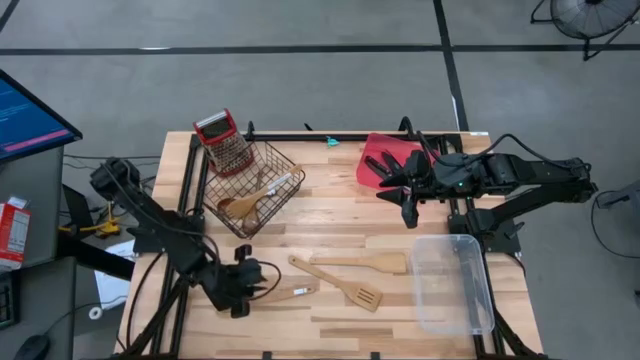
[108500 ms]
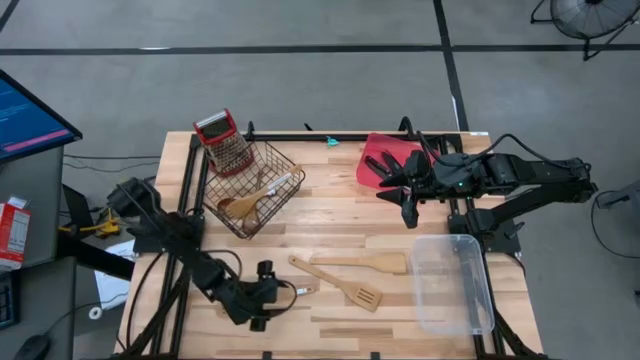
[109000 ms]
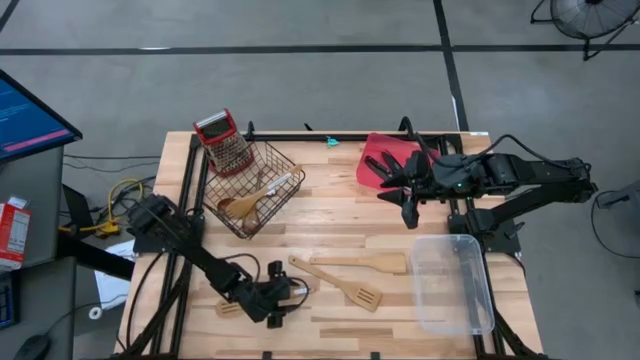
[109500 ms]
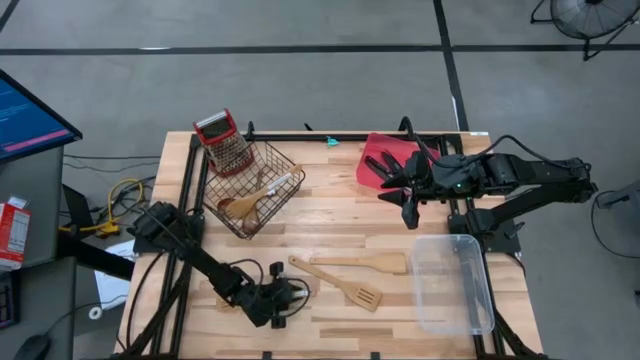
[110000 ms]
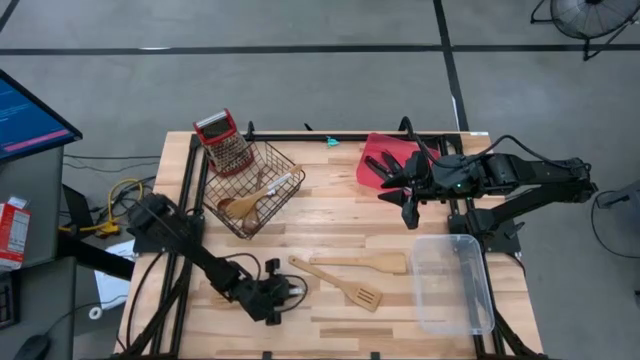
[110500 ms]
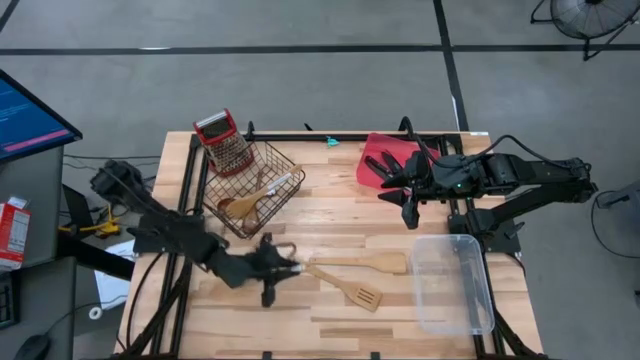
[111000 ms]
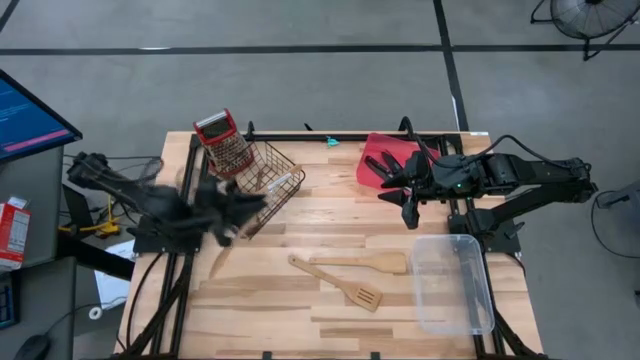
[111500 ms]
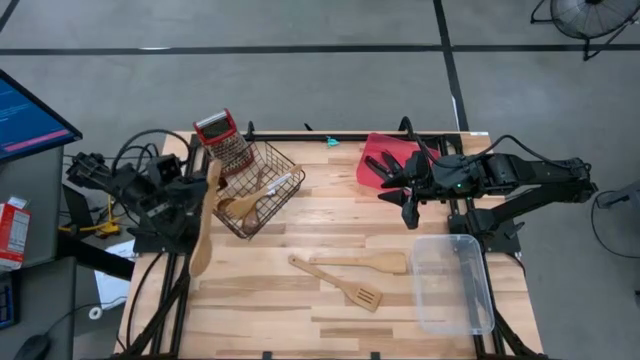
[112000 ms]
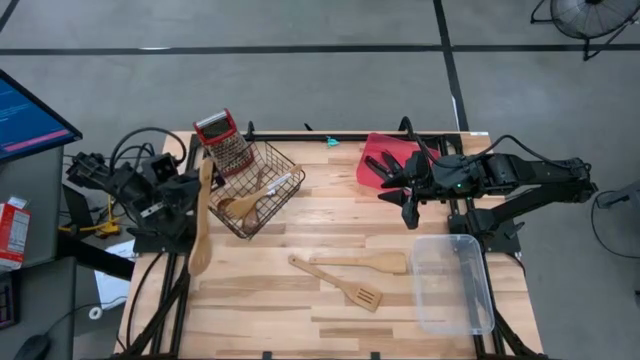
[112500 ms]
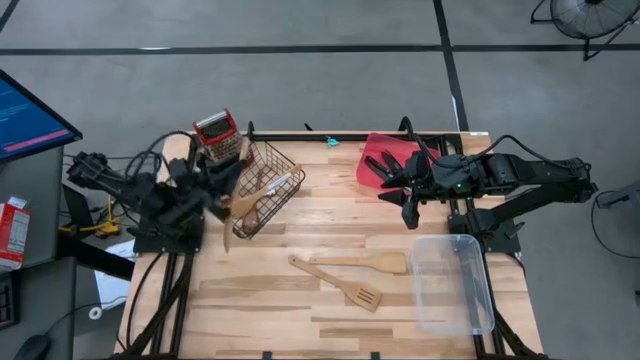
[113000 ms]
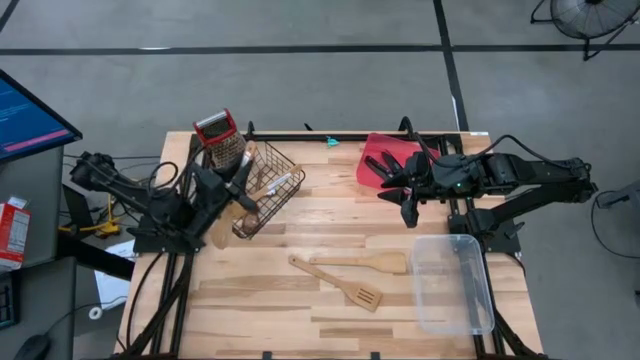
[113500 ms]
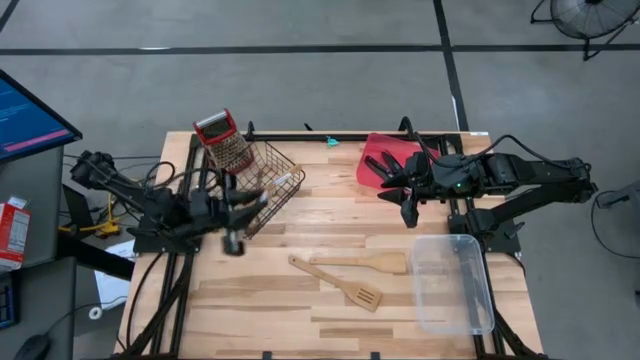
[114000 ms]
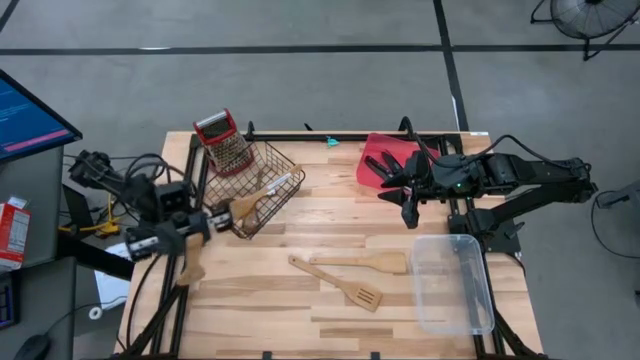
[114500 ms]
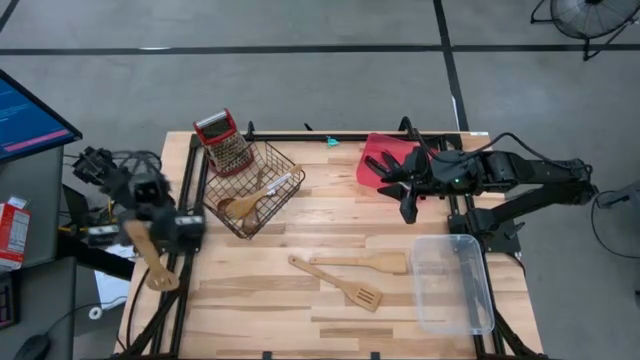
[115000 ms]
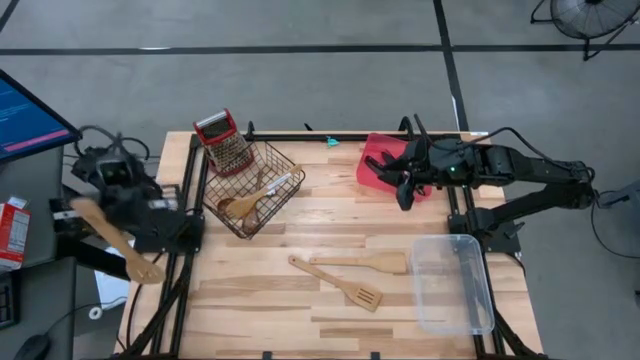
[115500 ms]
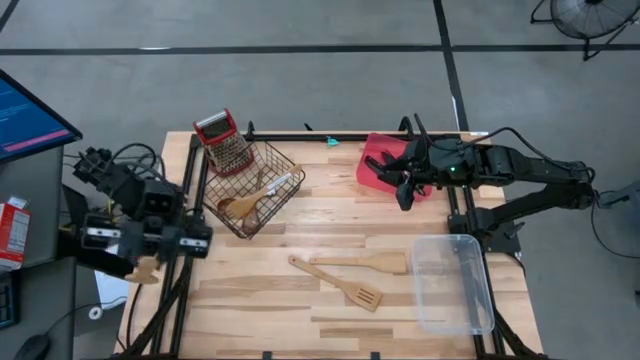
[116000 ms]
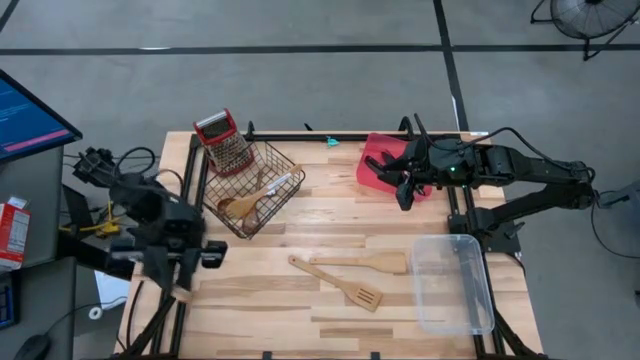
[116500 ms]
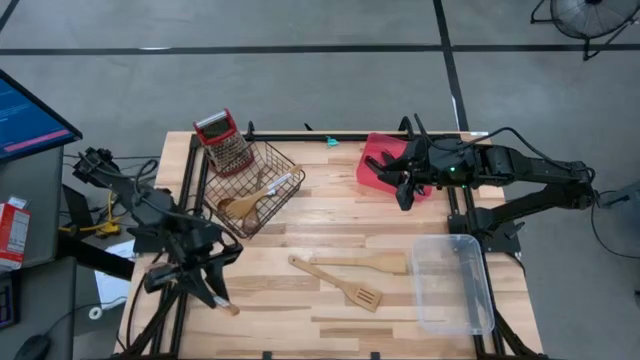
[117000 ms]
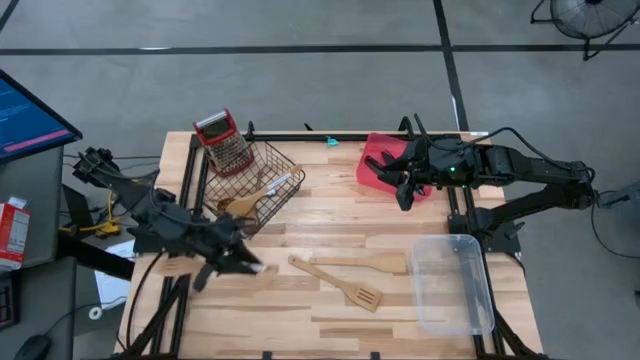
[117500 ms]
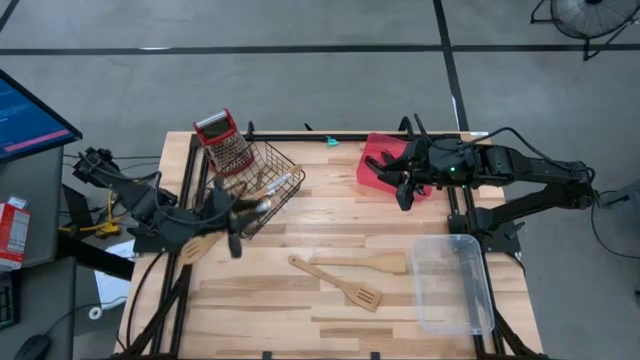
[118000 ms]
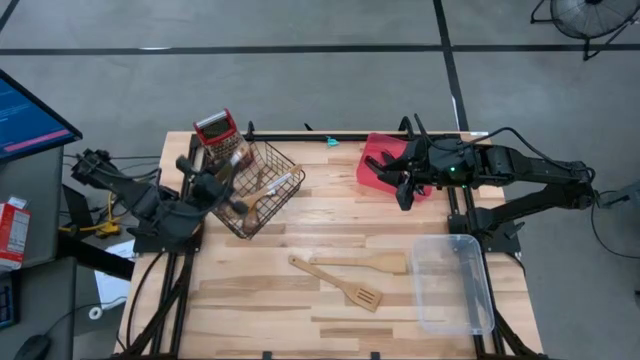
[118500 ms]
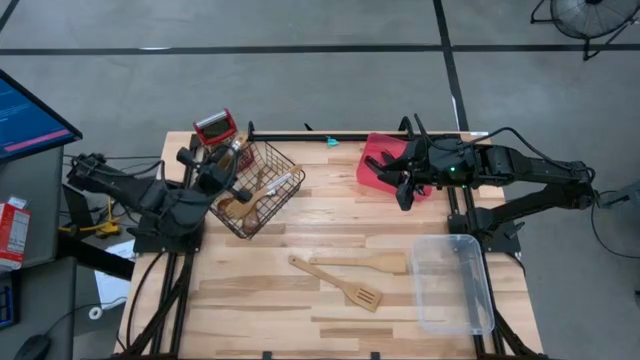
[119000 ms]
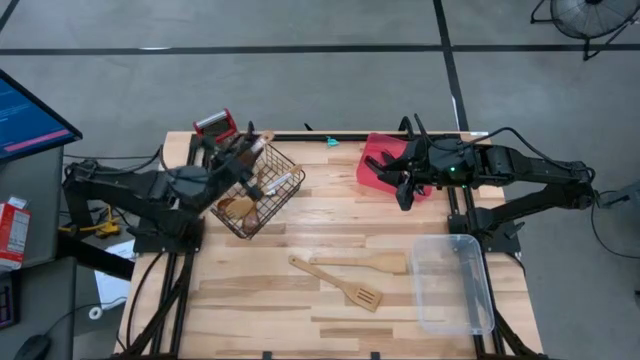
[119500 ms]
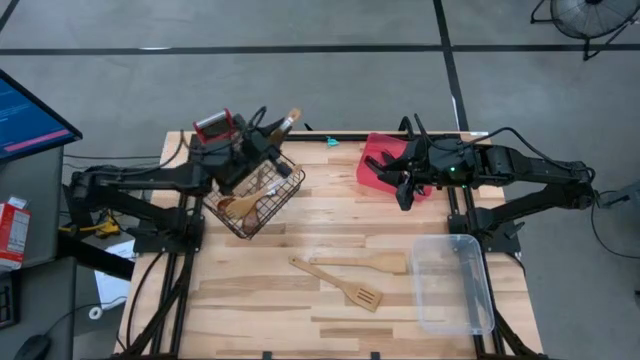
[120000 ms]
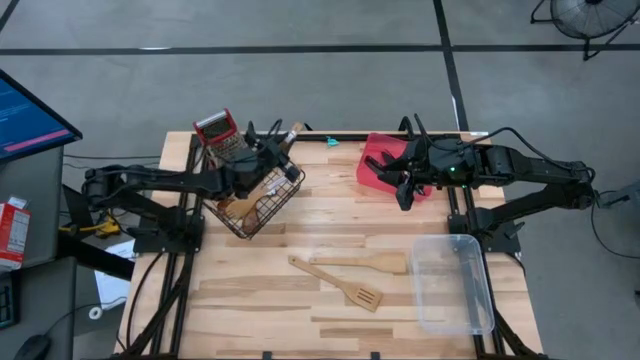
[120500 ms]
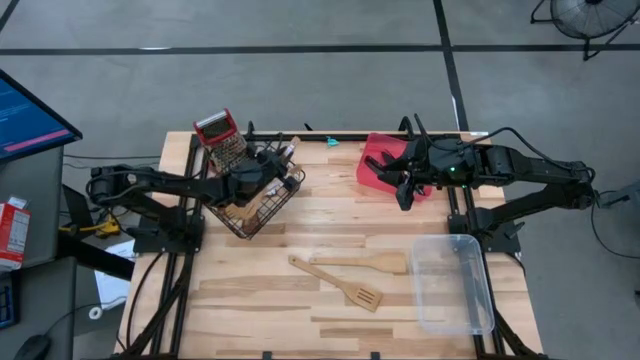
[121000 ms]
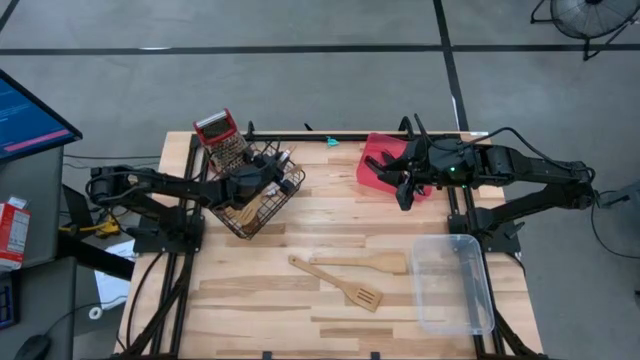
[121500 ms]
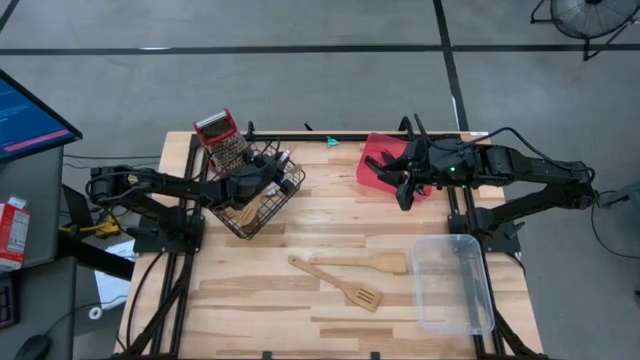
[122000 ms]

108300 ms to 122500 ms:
Task: Pick & Place Kitchen Items
Put the brown serving spoon into the black wire basket

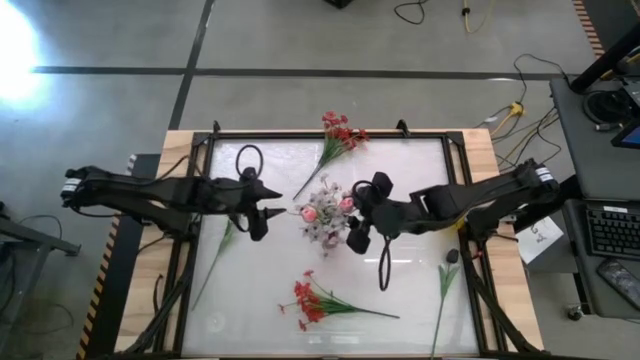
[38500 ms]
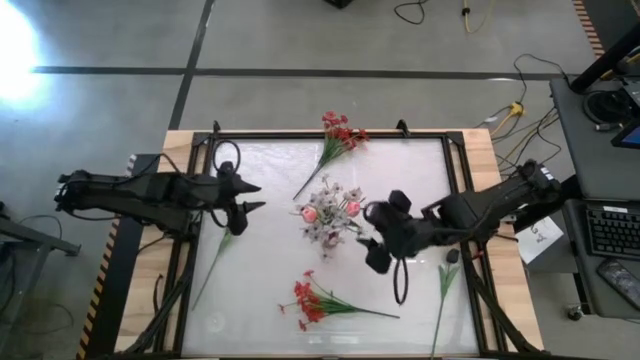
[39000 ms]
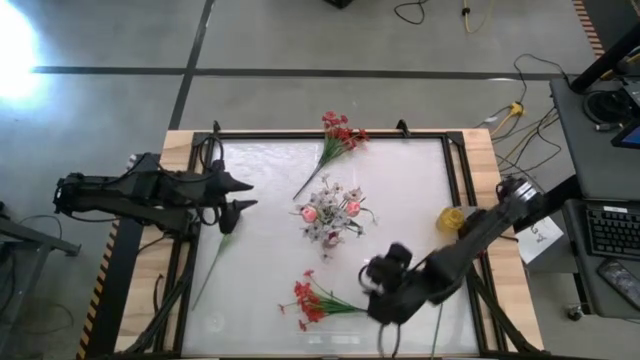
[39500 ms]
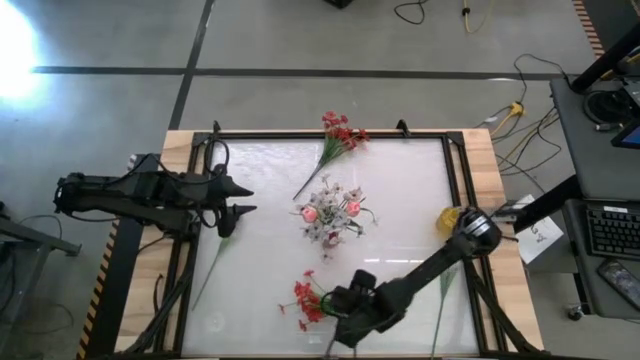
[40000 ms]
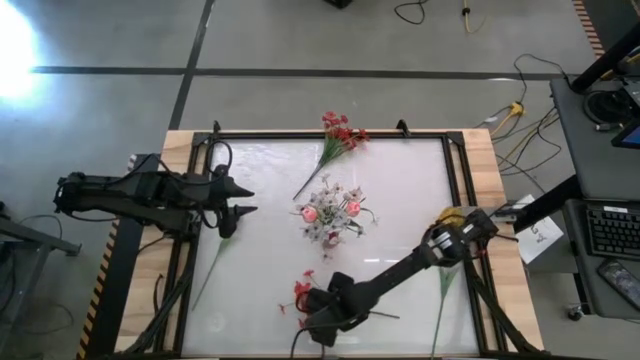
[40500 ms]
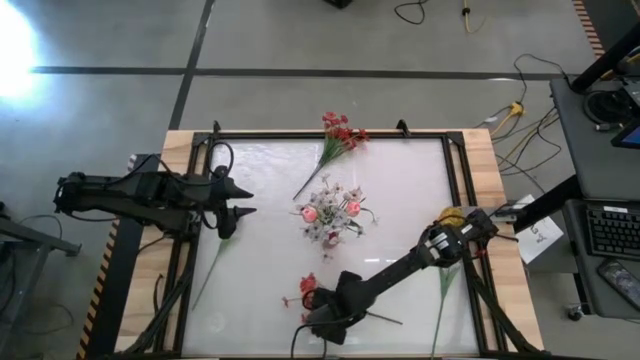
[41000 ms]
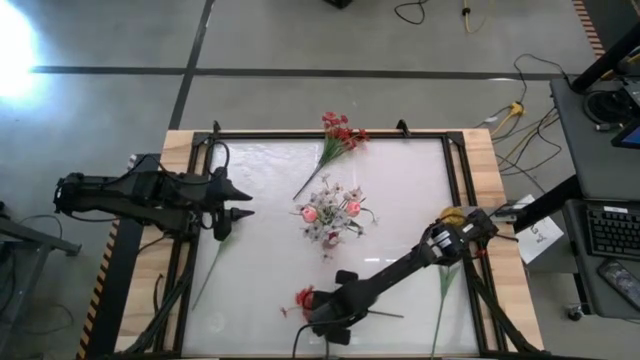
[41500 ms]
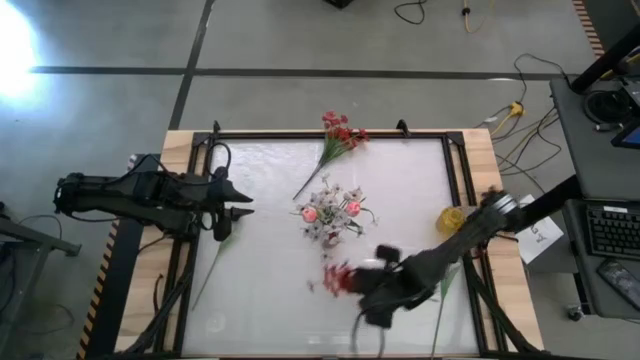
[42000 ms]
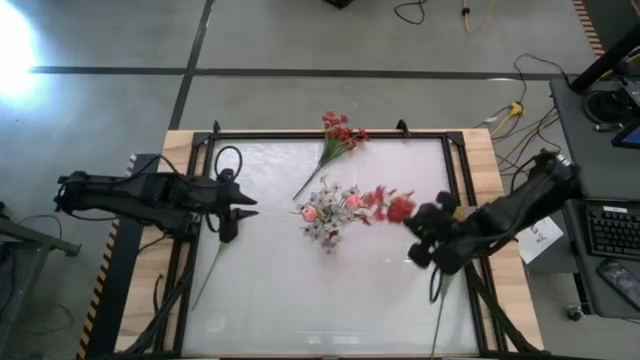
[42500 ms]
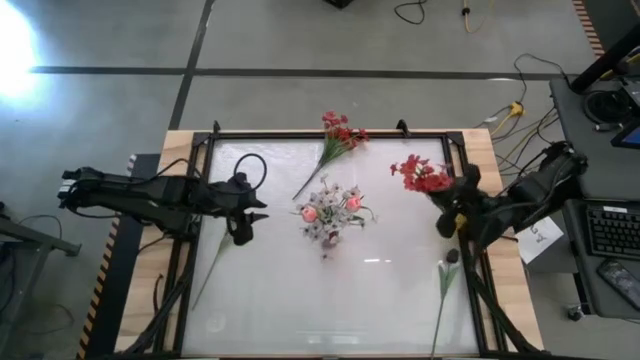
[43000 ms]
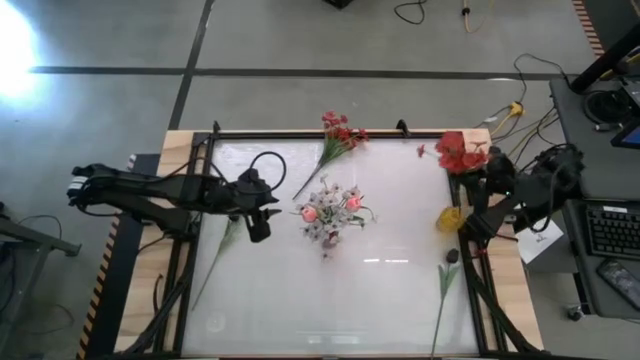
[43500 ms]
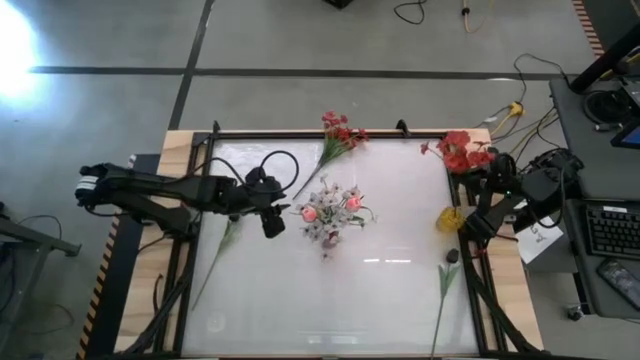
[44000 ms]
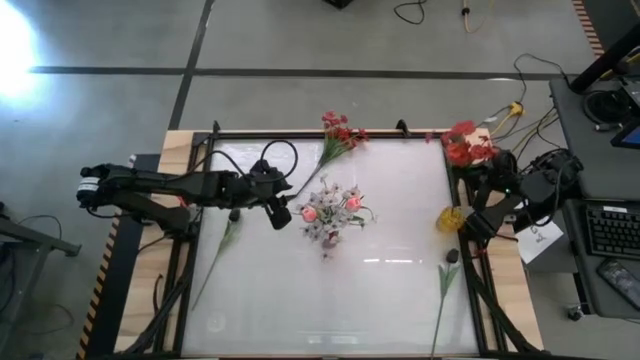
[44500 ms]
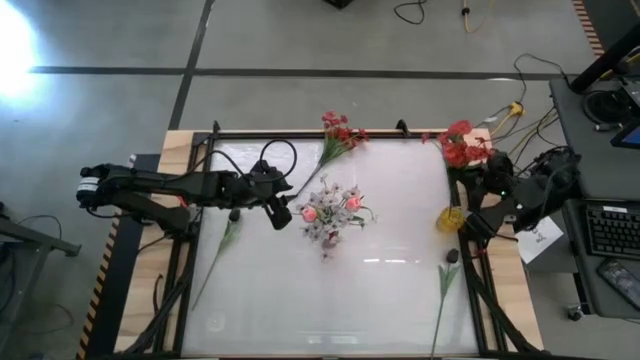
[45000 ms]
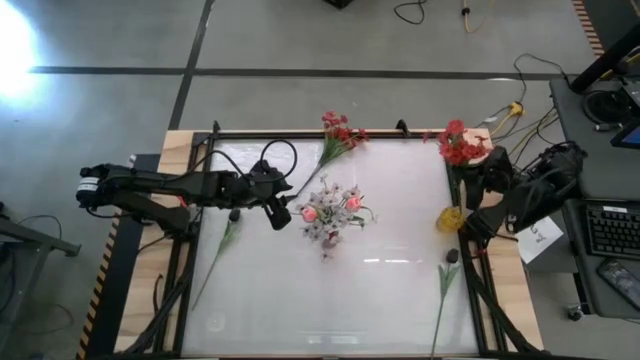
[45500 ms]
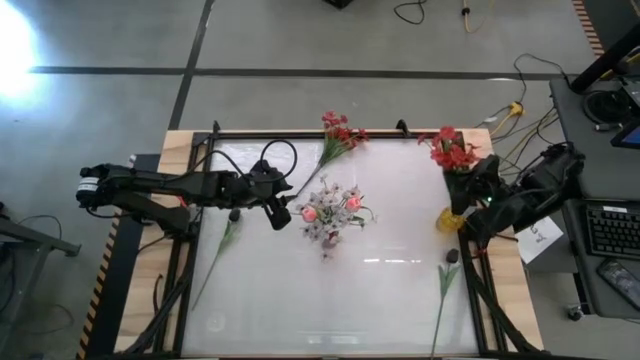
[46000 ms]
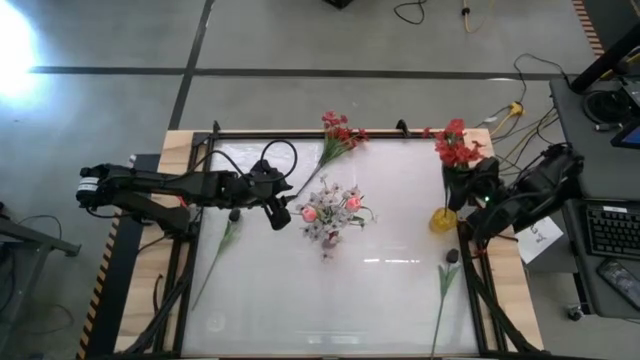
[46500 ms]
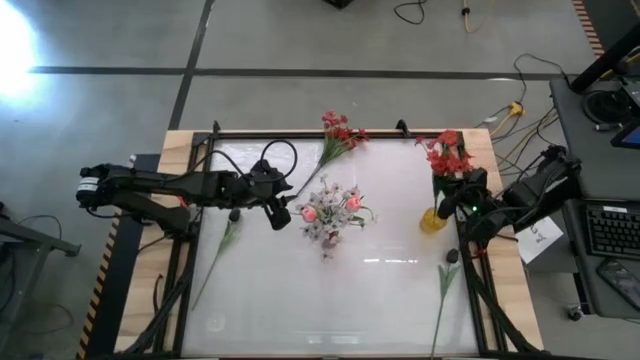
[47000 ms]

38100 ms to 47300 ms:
Task: Sort flowers into vase by color
Put the bottom red flowers into the red vase
